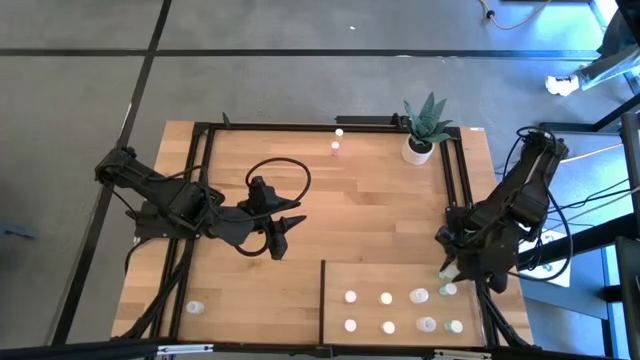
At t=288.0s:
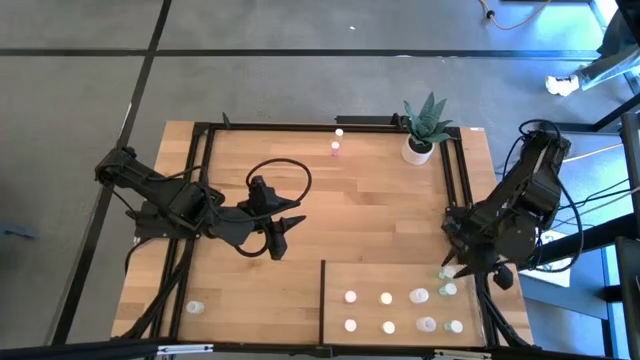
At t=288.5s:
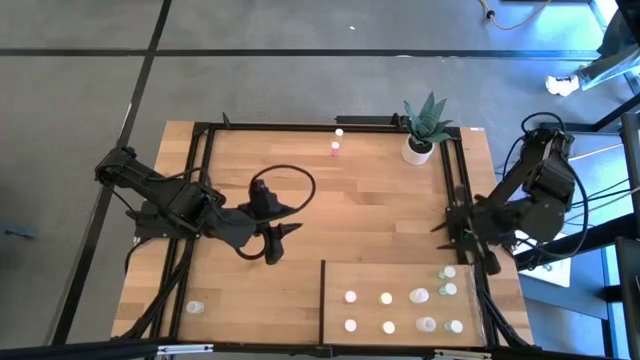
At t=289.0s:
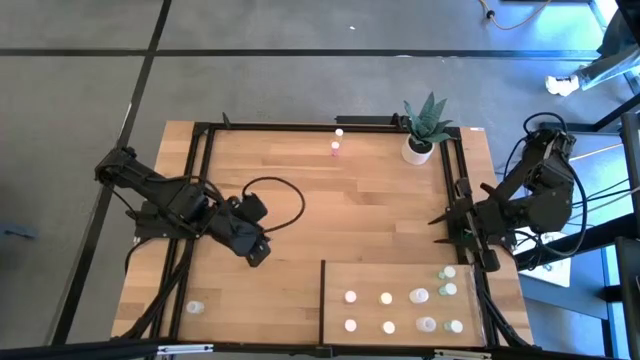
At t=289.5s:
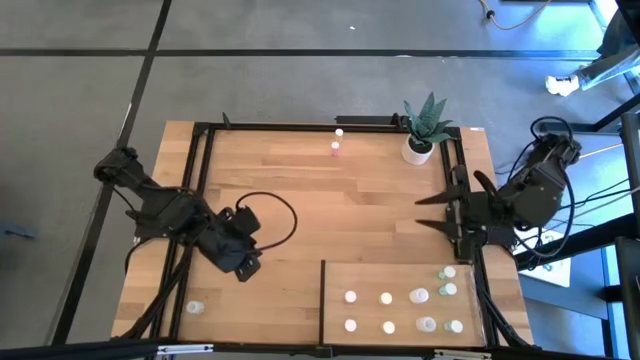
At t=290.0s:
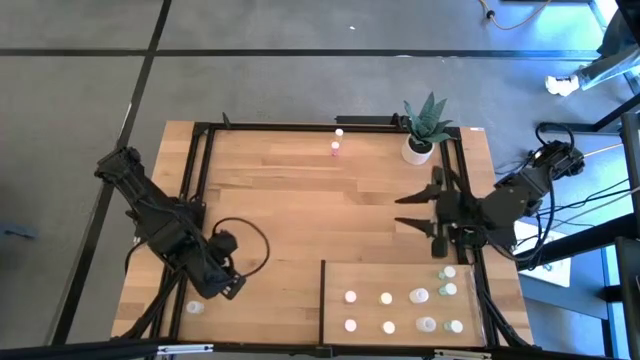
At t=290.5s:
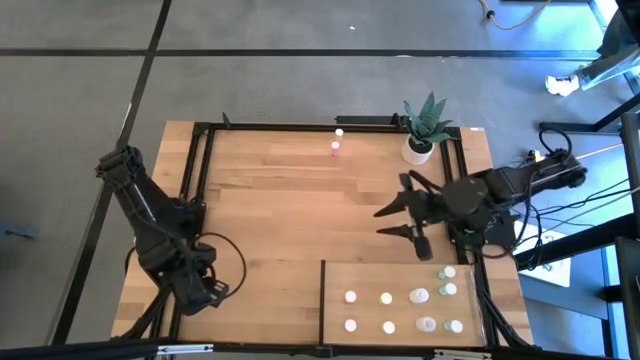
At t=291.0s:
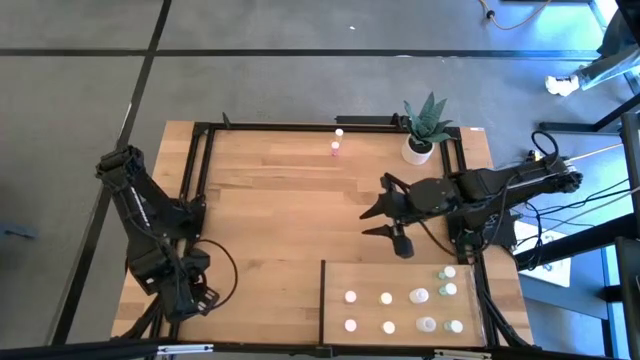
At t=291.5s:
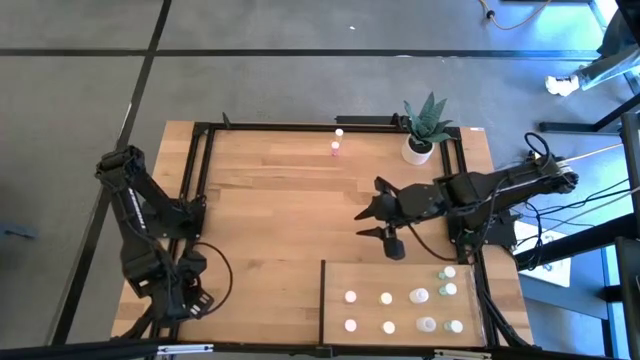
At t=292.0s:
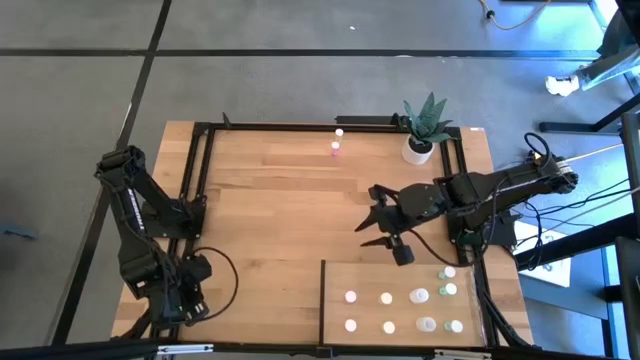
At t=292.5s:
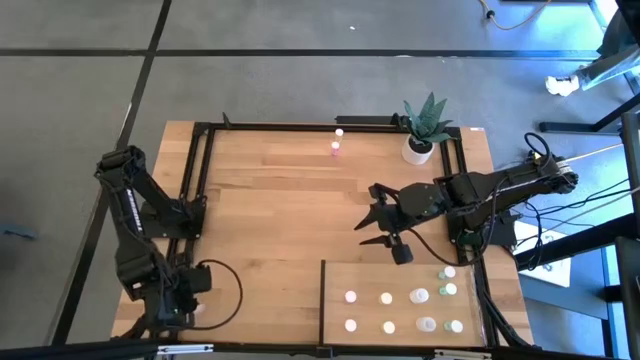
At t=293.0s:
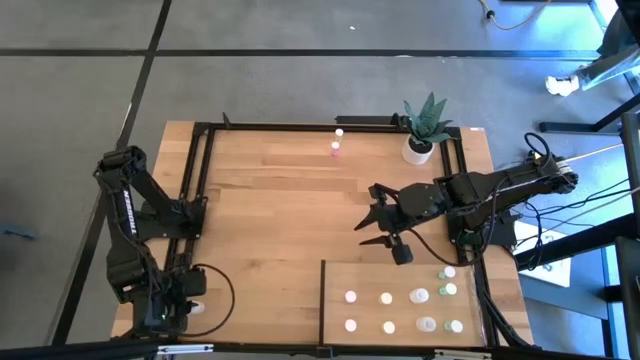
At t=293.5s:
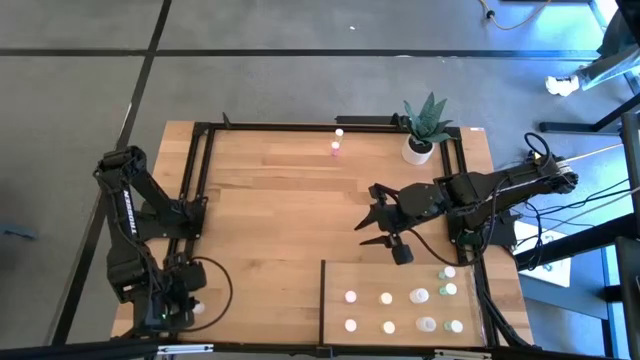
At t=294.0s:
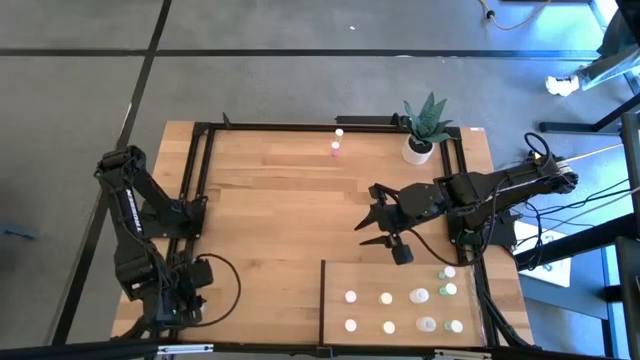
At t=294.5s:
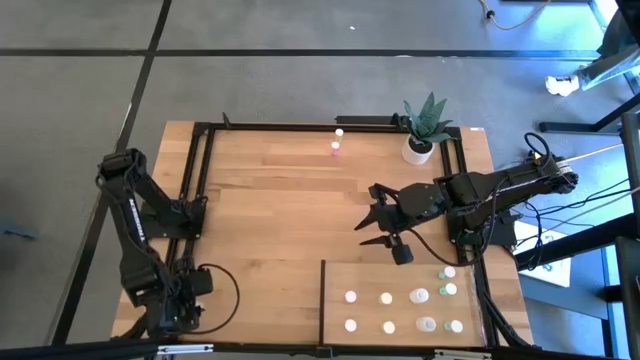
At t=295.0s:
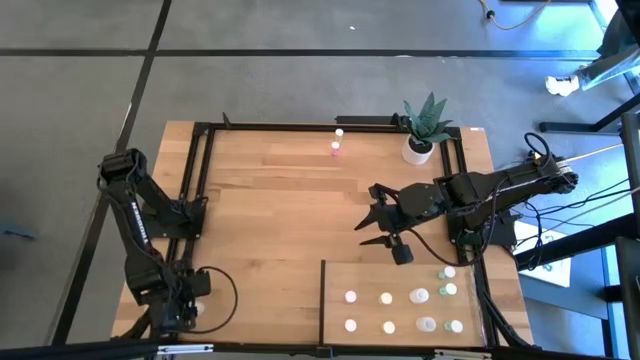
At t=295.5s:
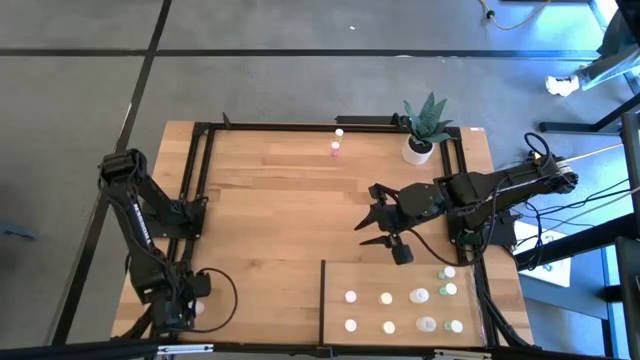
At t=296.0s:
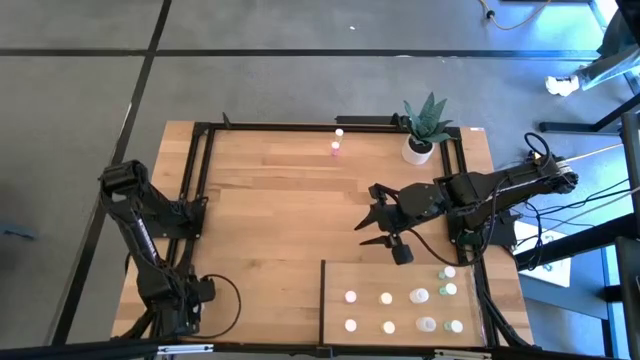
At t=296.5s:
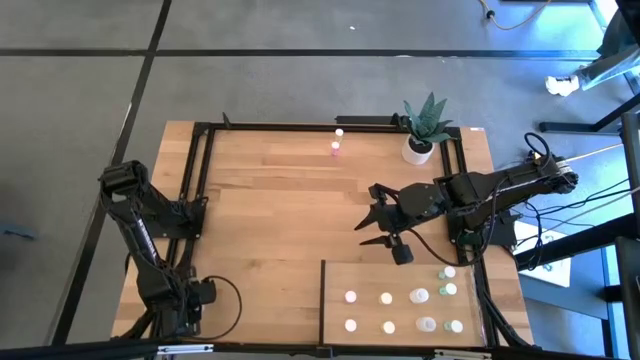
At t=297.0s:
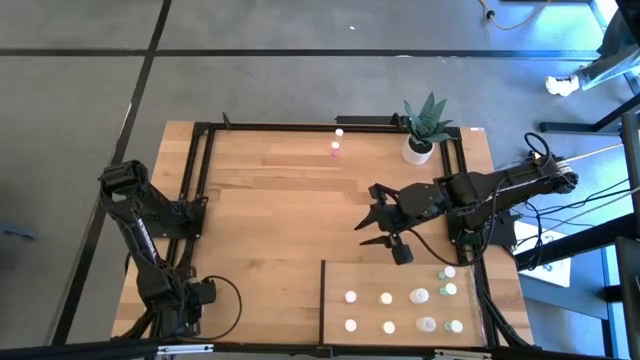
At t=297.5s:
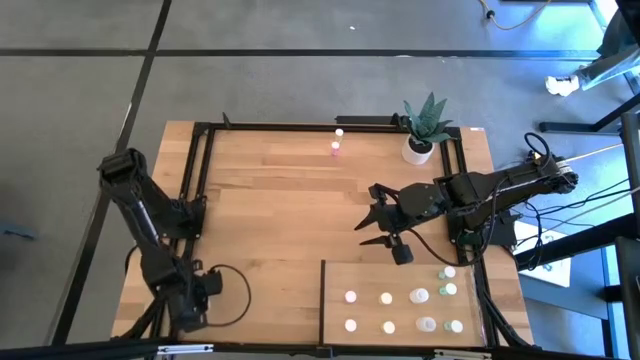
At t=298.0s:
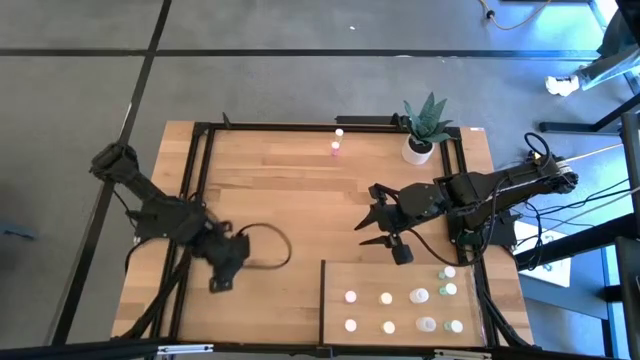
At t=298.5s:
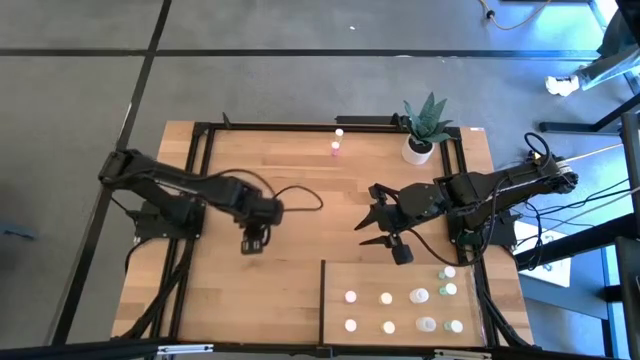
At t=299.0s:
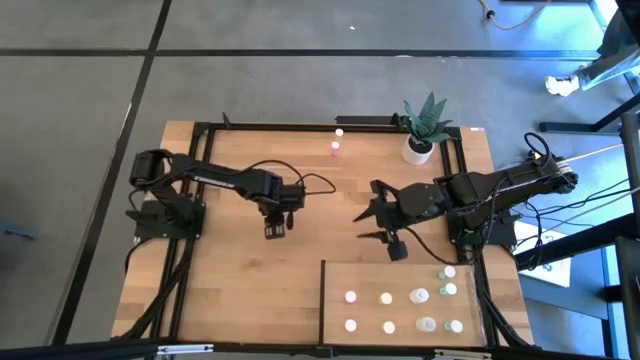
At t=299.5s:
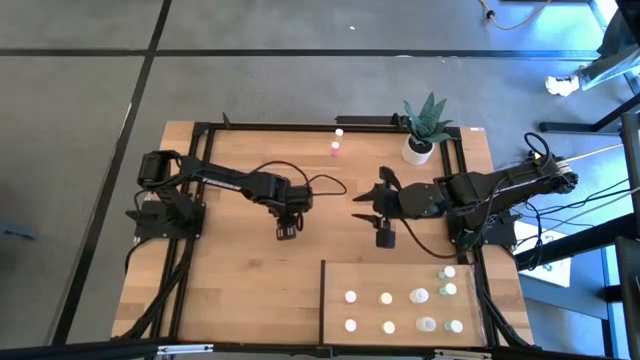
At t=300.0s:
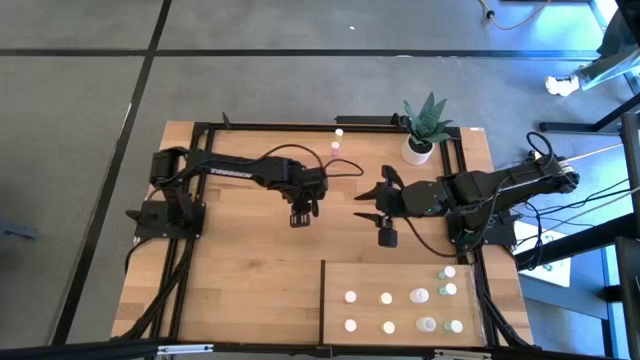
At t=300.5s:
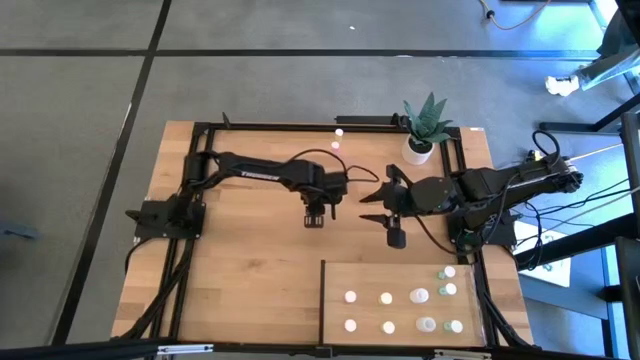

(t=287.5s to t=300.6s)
Task: Pick and place medicine bottles onto shelf by color
Put the transparent pill bottle on the shelf aligned with the other transparent pill bottle

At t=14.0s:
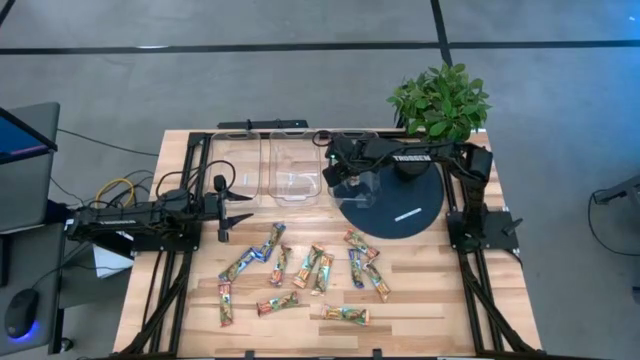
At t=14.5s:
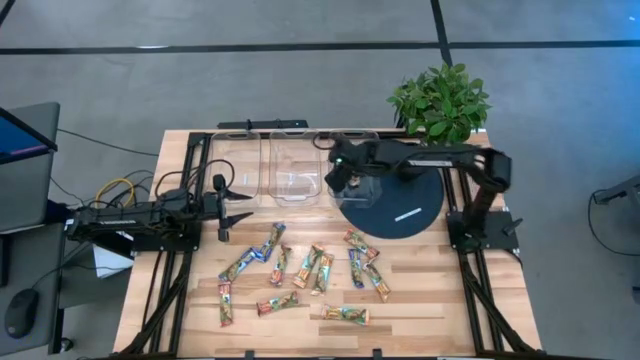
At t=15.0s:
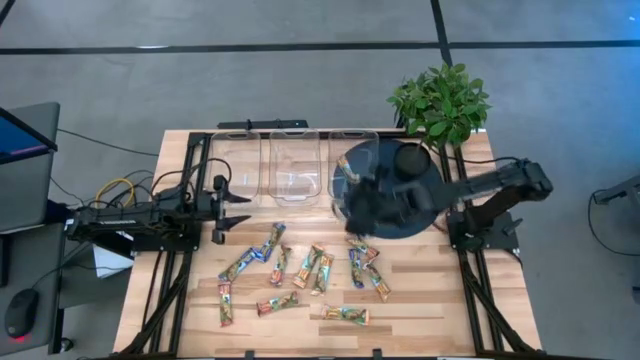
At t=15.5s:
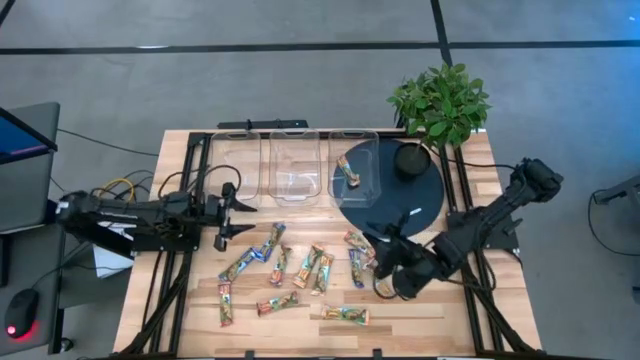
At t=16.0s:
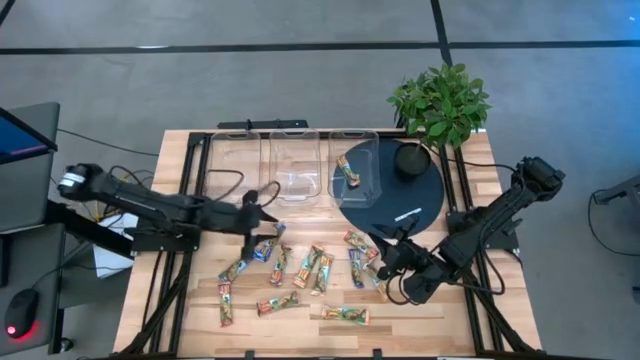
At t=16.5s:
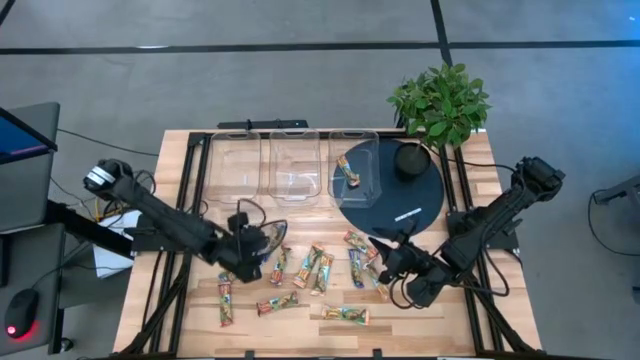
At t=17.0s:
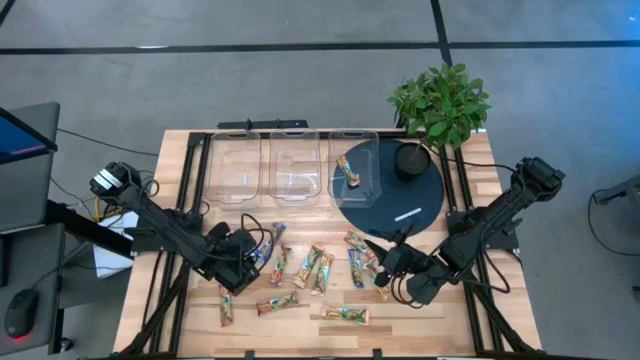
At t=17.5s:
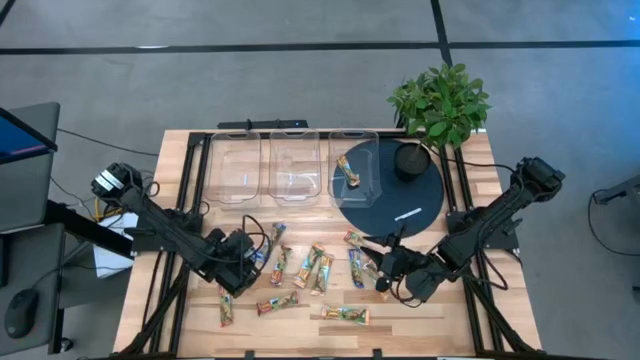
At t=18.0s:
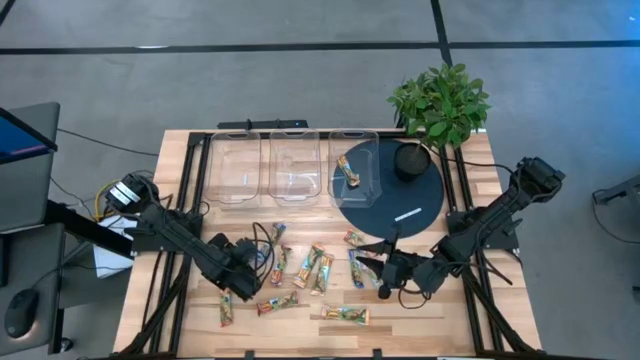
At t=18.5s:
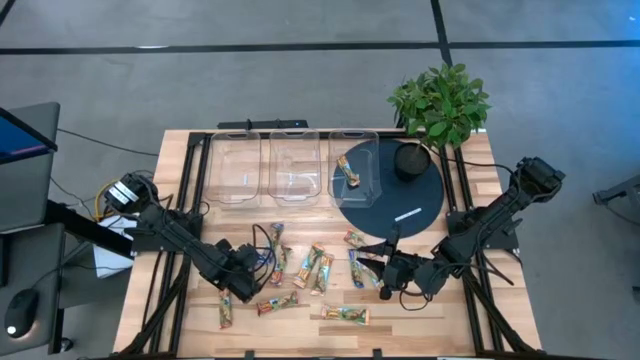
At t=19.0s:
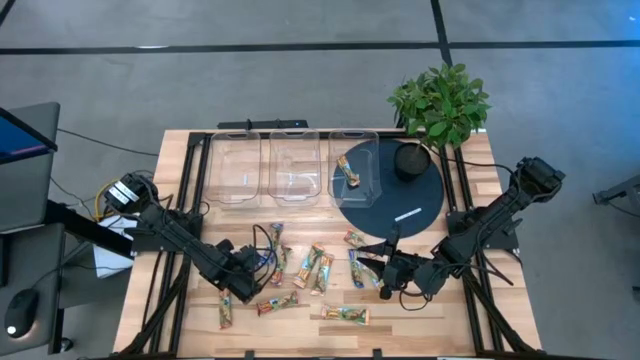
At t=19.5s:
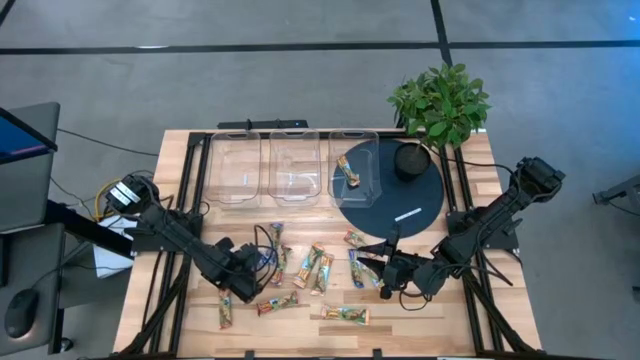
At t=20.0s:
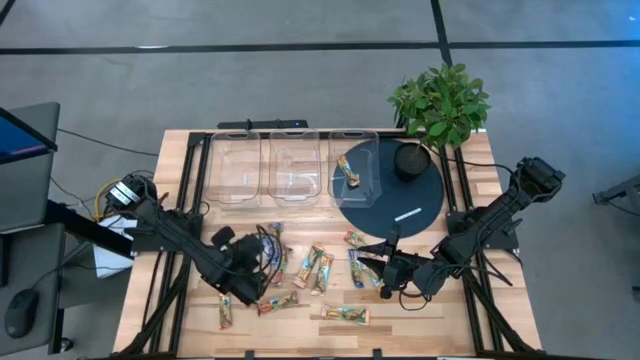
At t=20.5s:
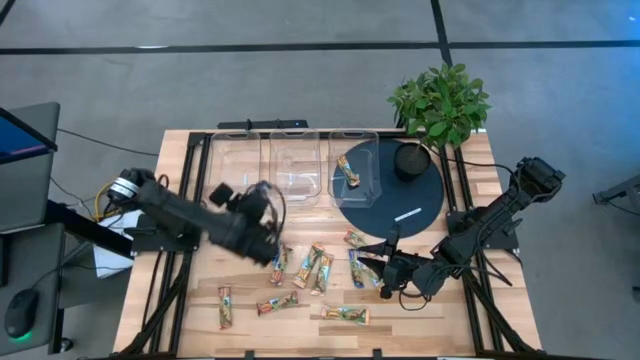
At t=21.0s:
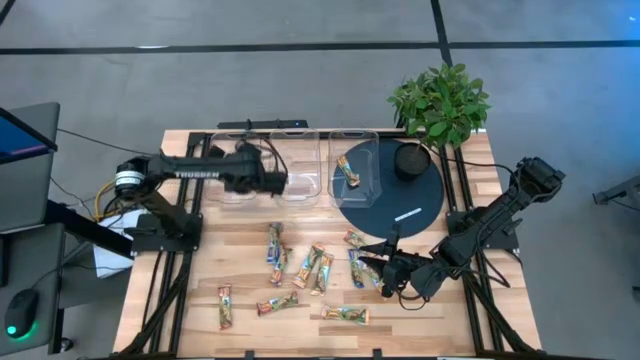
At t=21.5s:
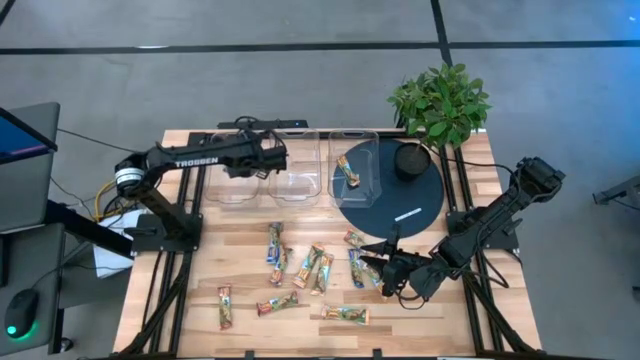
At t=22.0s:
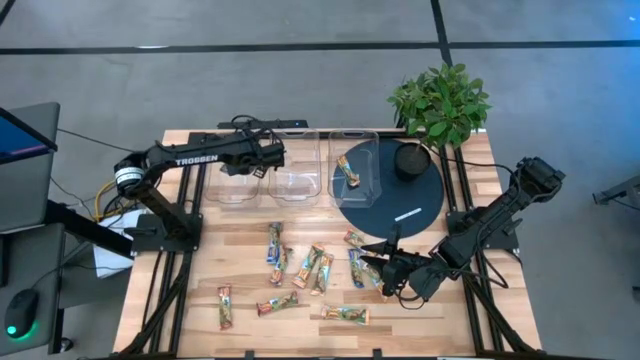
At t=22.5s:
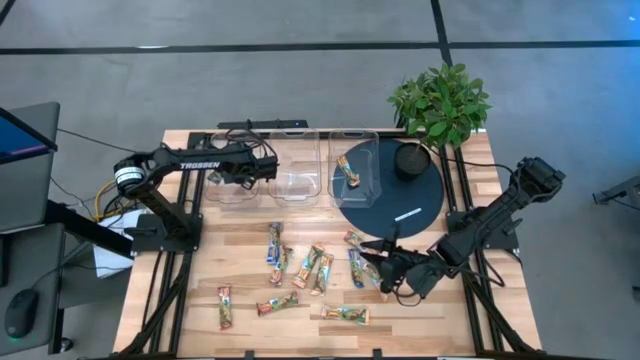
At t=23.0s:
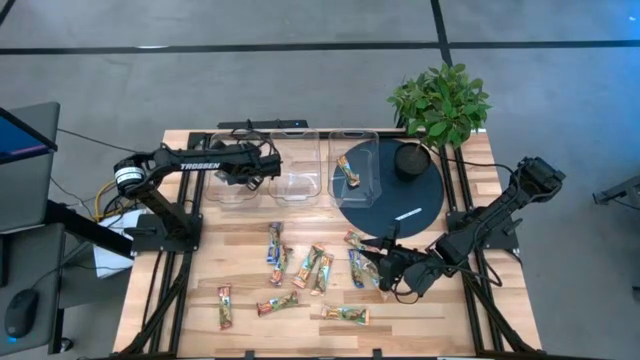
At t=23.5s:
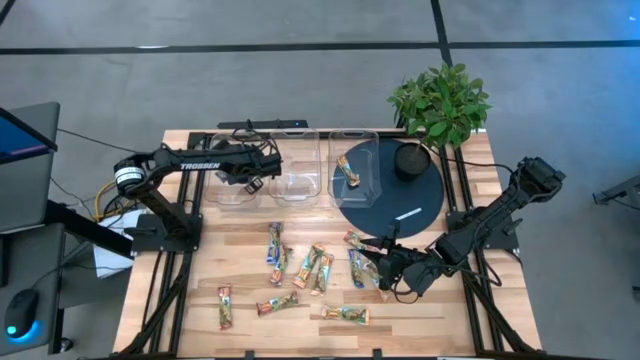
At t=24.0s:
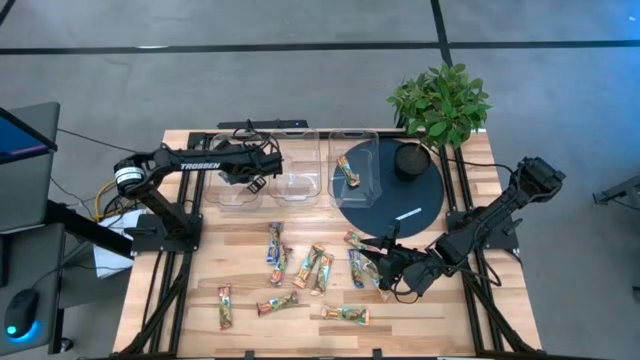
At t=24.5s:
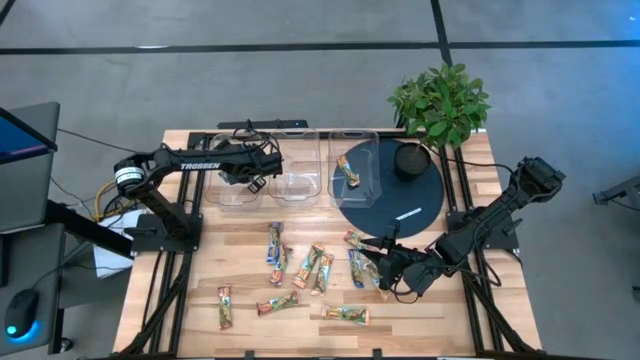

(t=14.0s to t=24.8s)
Task: Pick and place Granola Bars by type
Put the left blue chocolate chip into the left transparent bin
